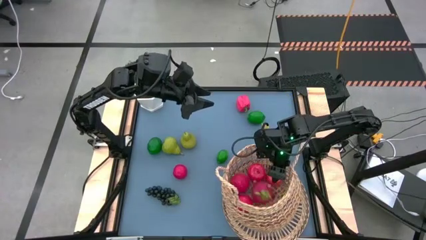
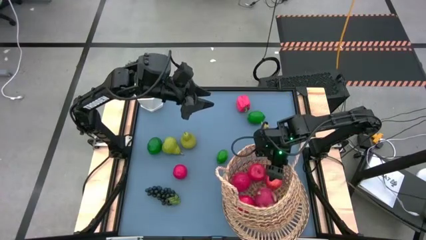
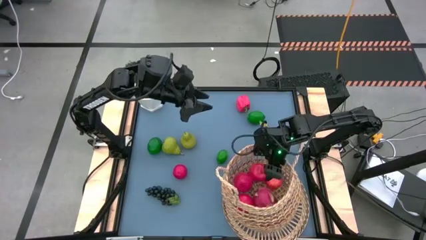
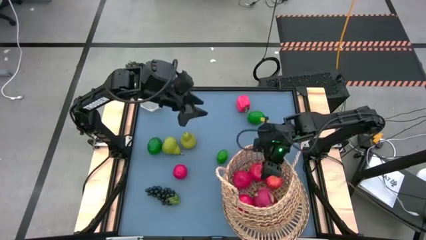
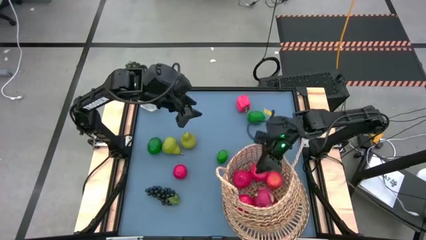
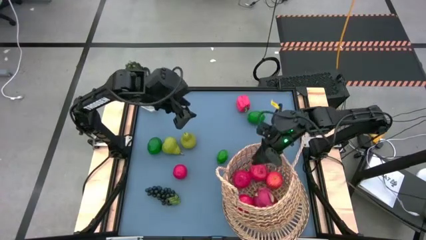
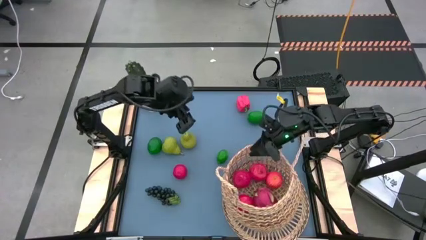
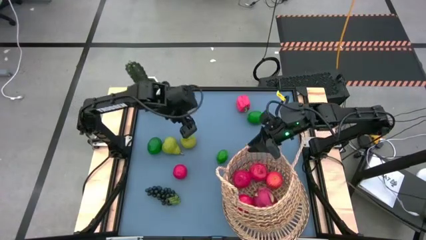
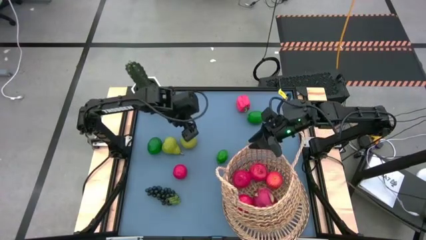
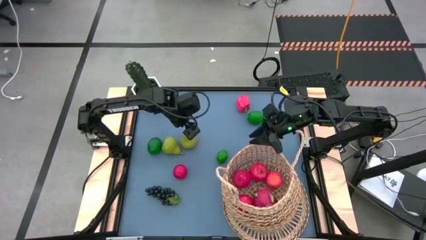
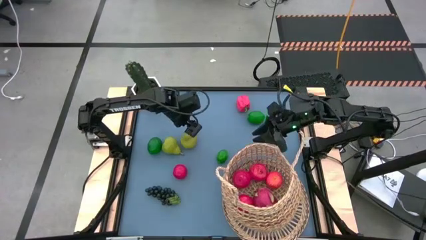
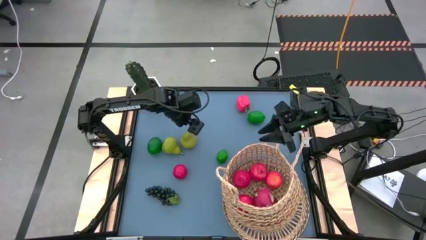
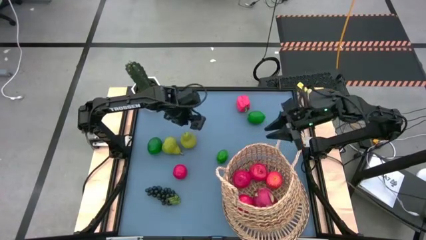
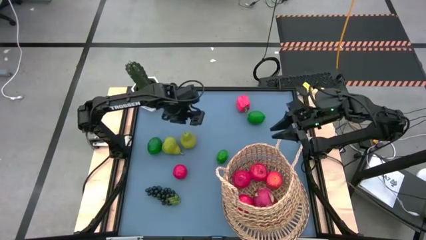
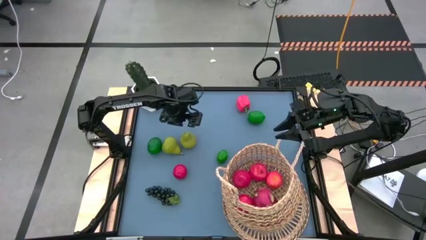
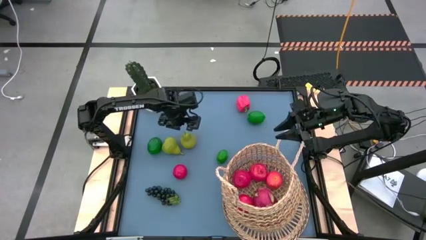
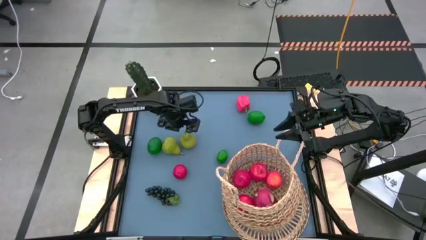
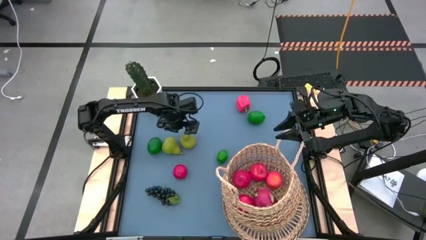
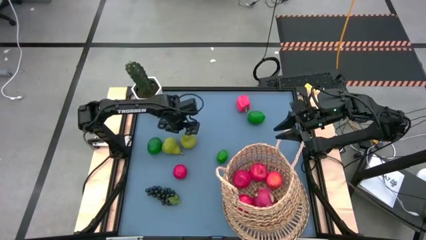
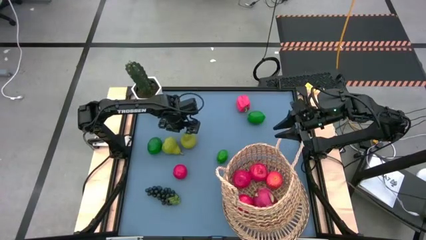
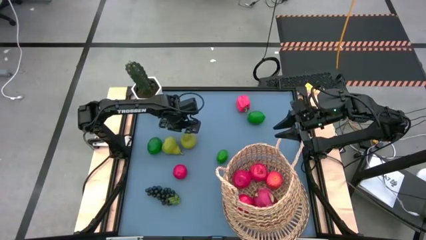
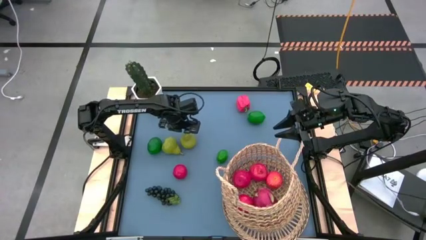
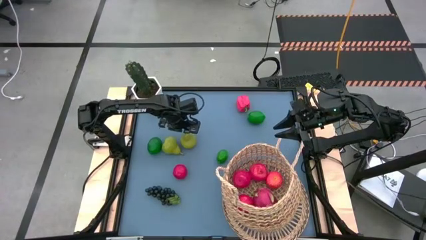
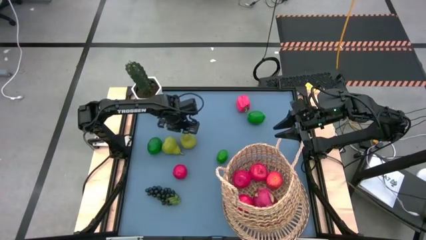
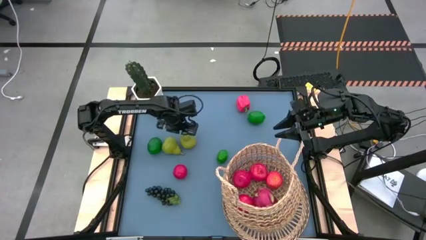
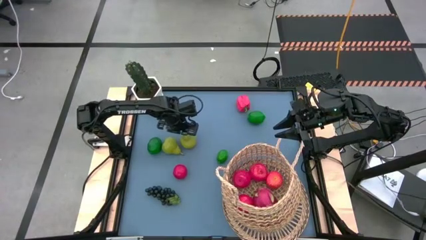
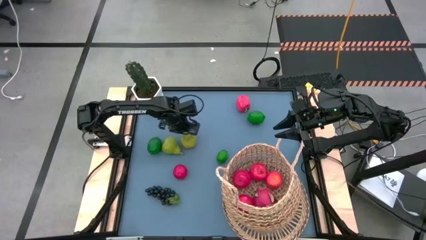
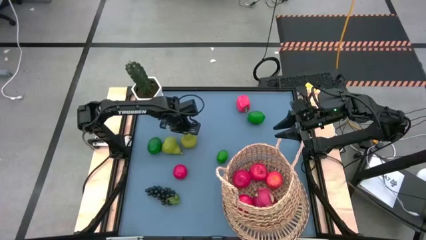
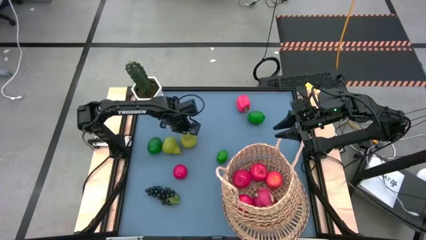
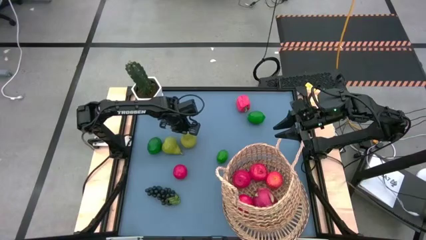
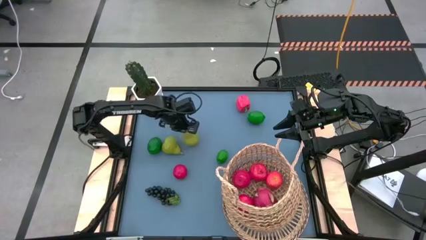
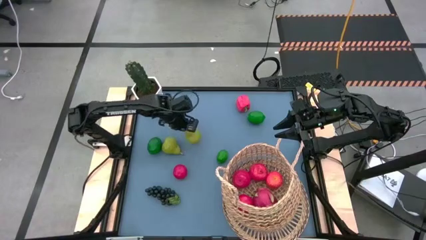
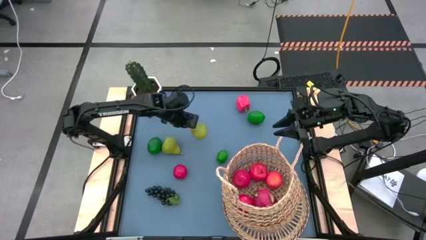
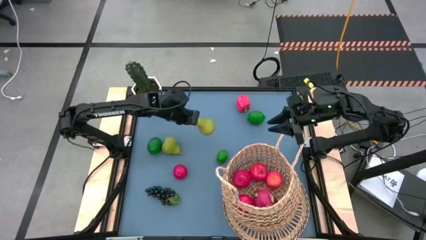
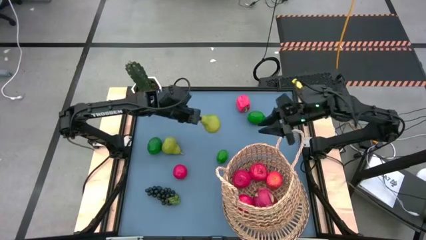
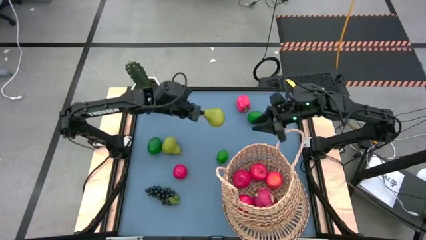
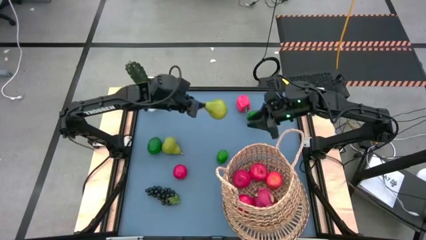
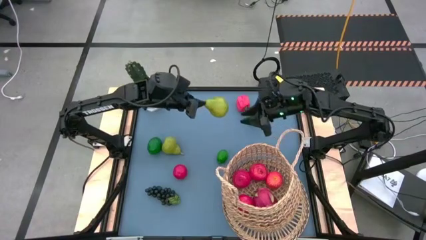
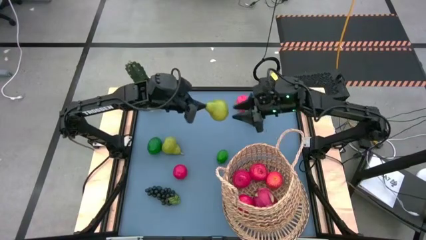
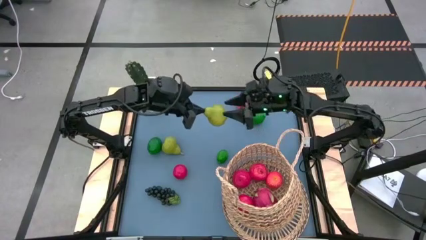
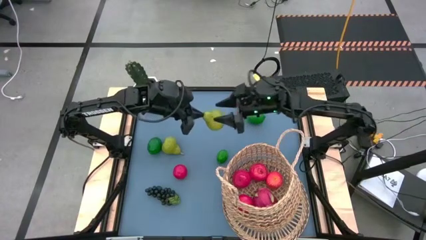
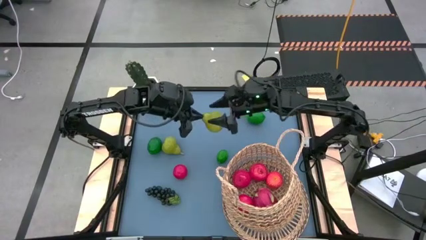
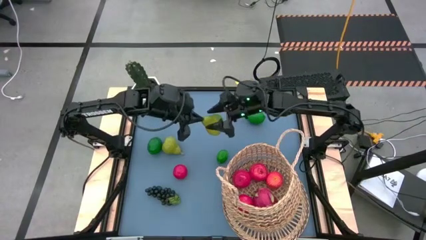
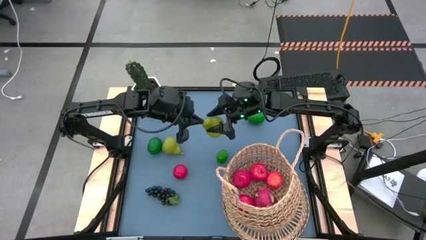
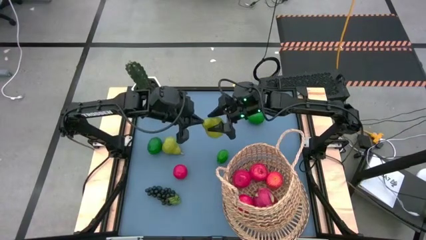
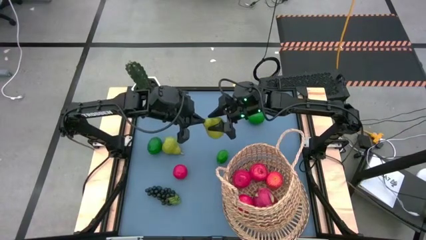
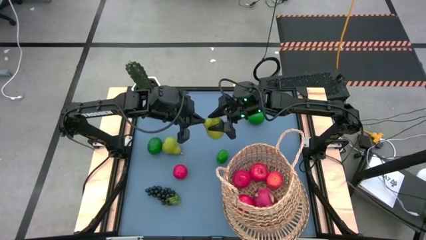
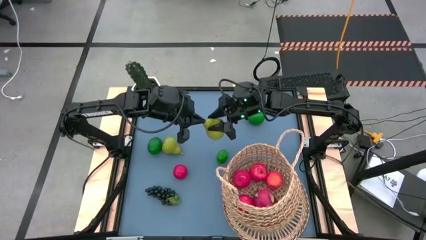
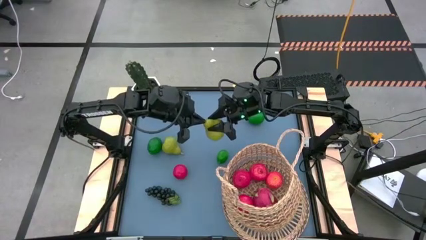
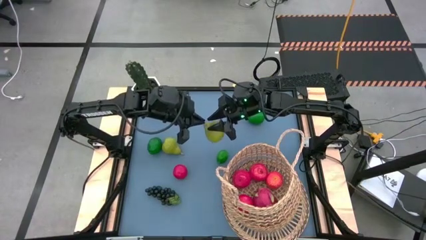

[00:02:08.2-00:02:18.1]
Task: Build produce basket
Put the green pear into the brown basket

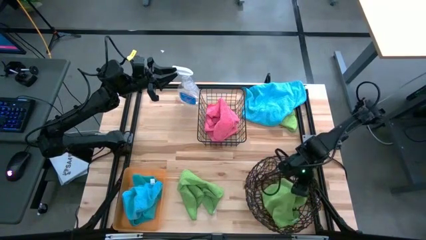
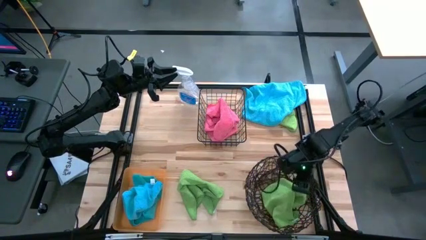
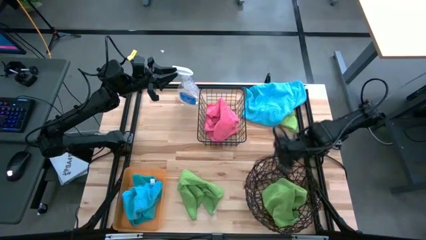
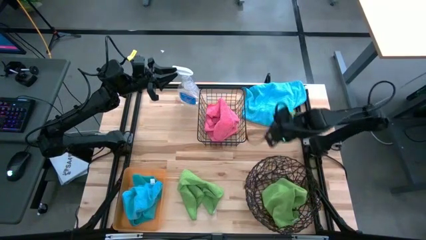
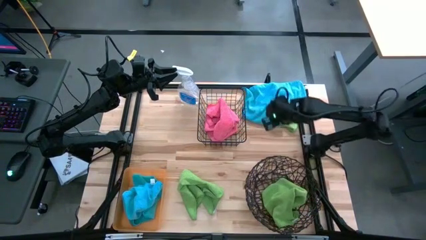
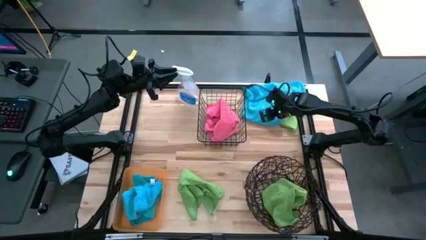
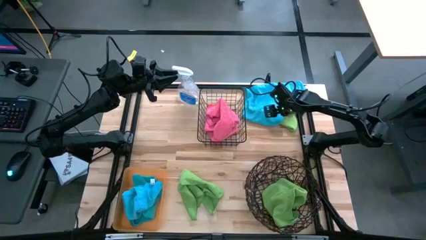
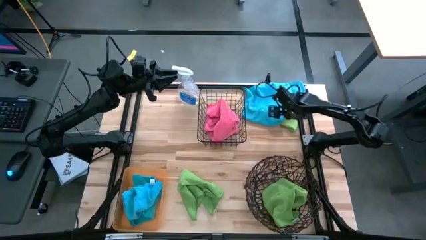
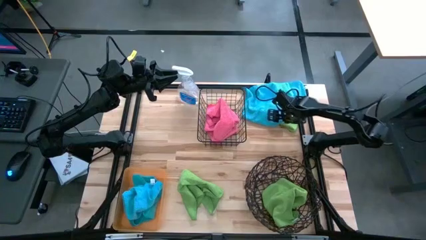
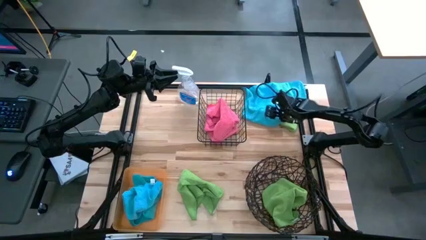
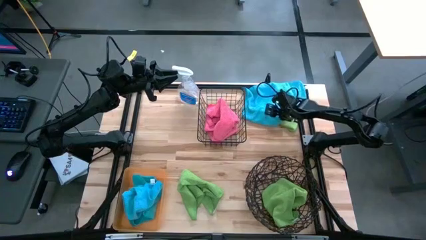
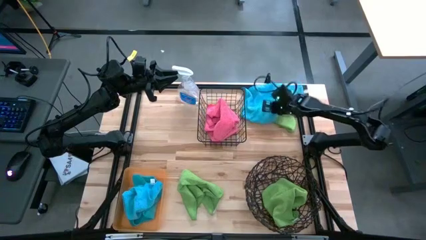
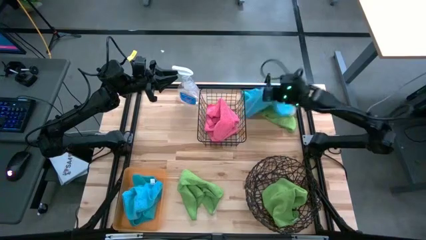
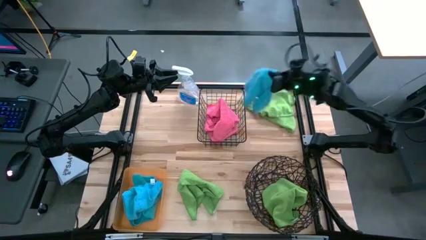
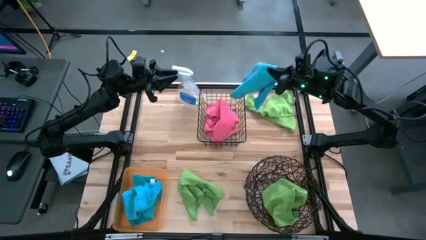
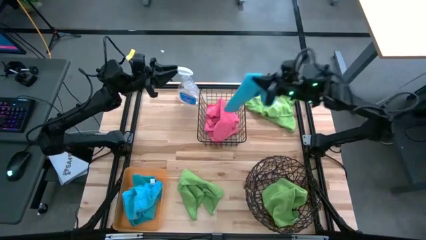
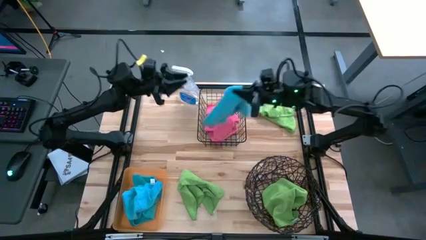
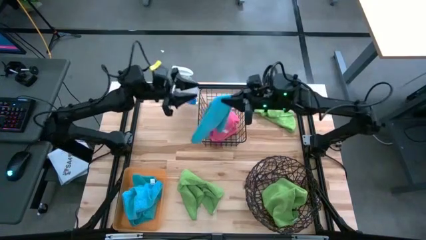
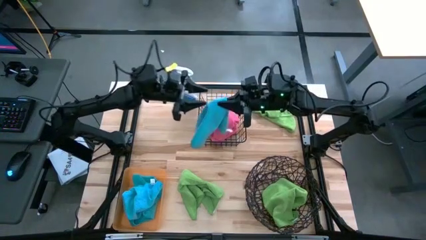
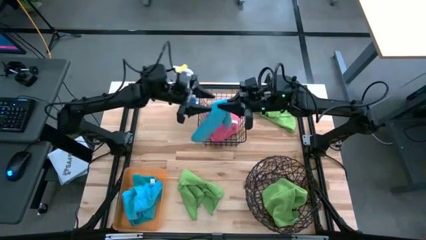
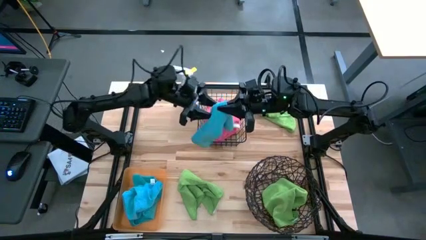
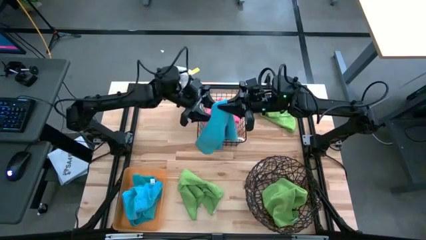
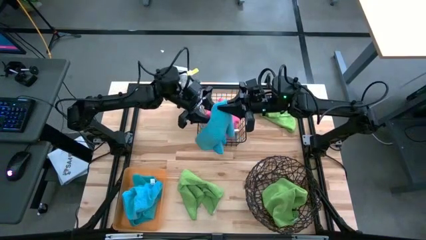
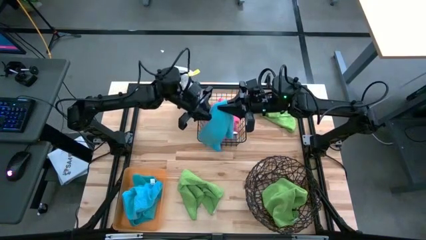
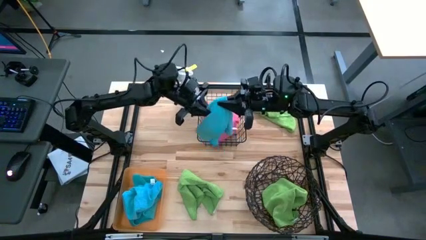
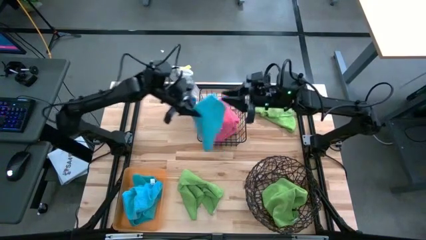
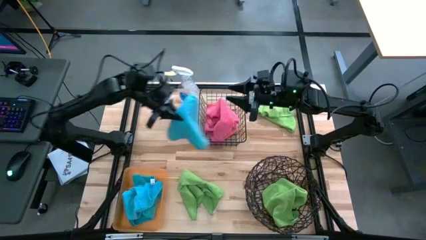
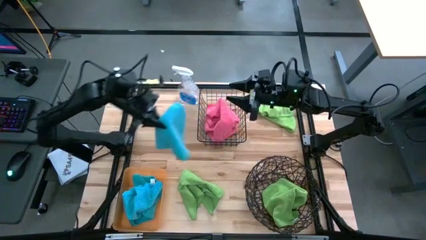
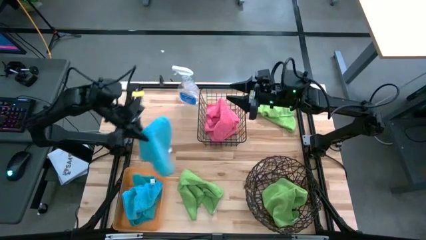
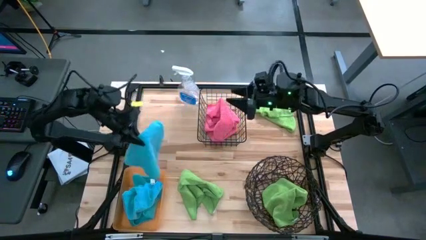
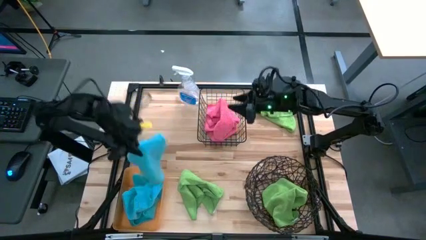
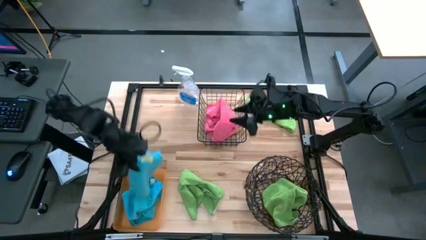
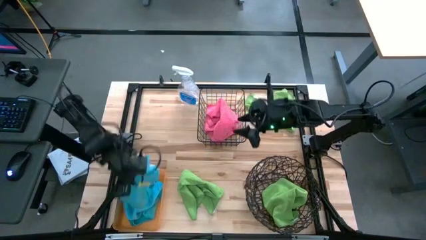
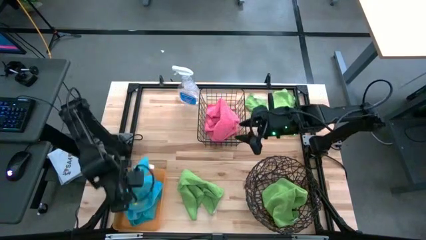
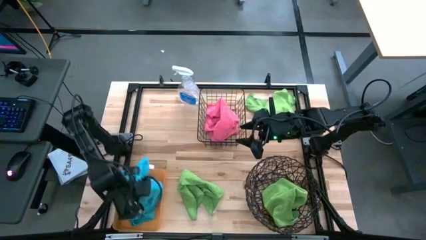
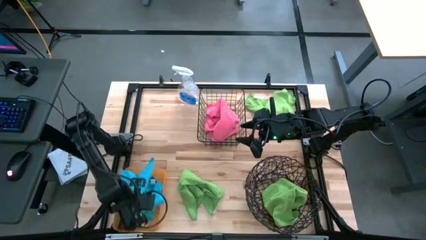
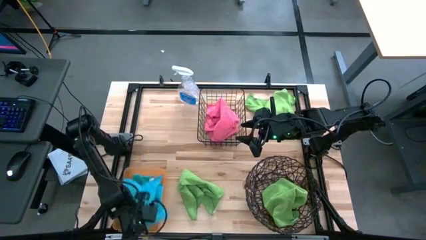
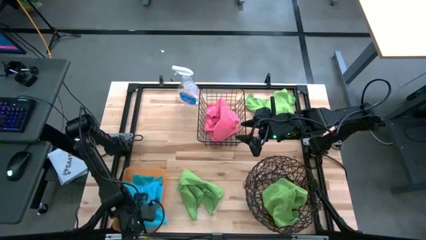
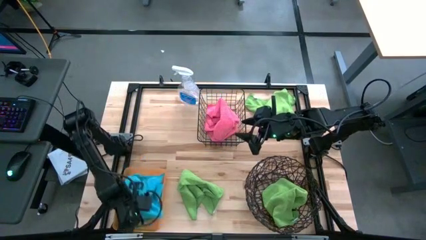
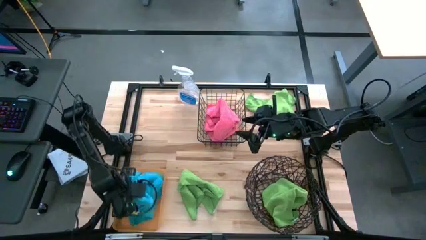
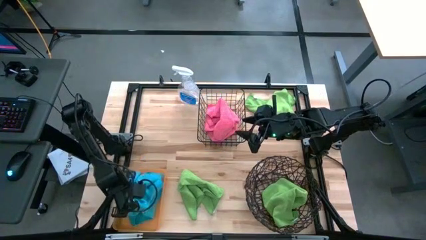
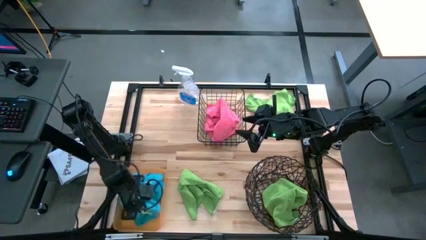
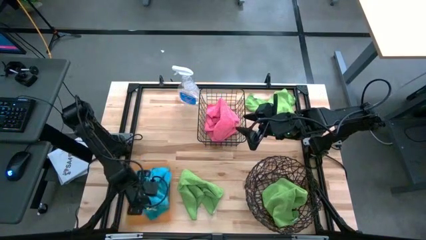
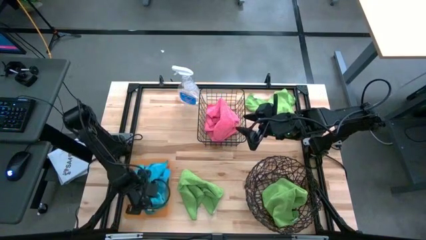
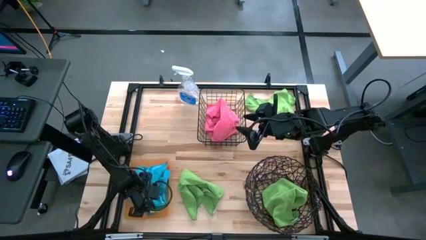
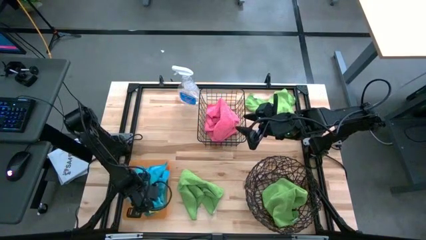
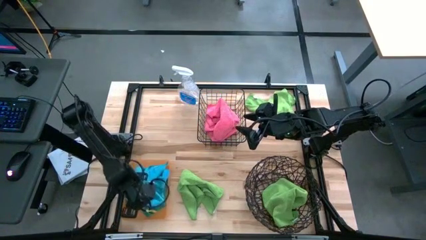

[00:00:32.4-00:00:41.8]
Task: Sort microfiber towel by color & place in baskets
Put the blue towel into the orange bin
